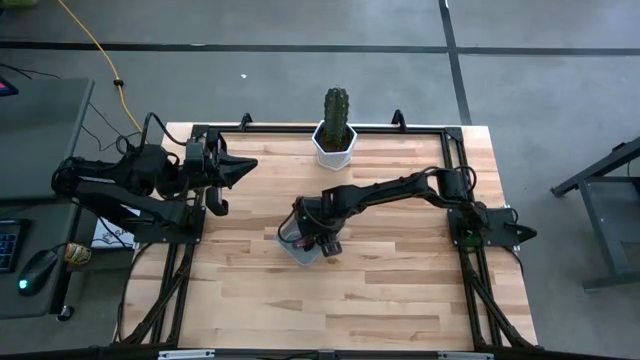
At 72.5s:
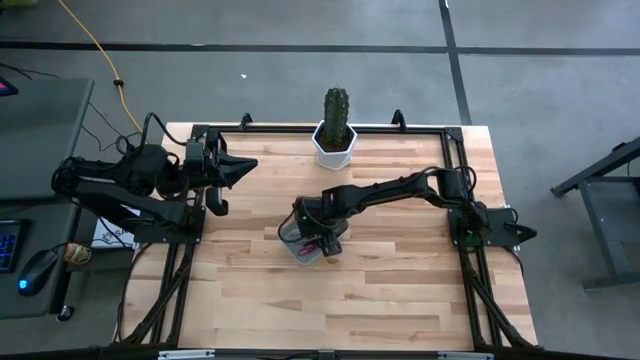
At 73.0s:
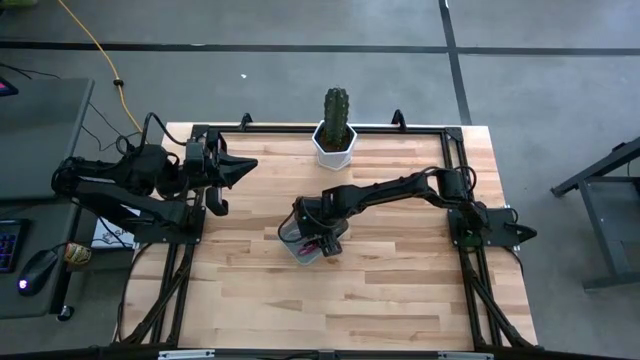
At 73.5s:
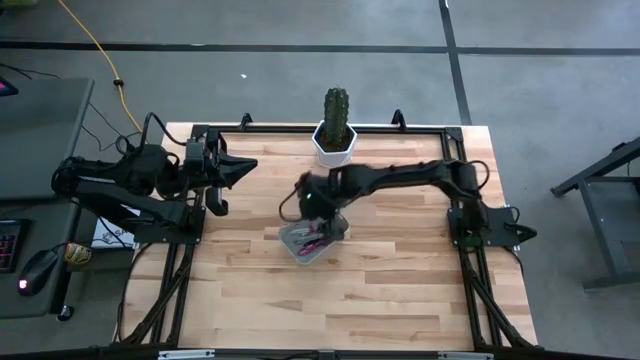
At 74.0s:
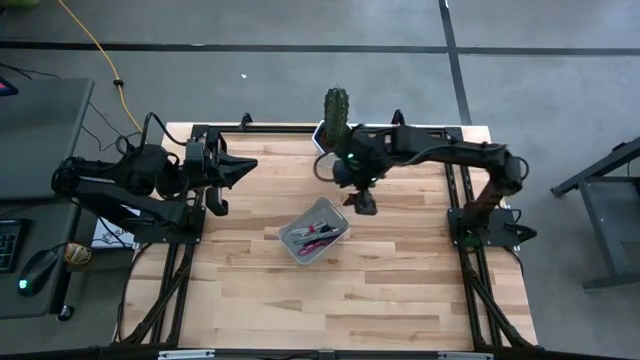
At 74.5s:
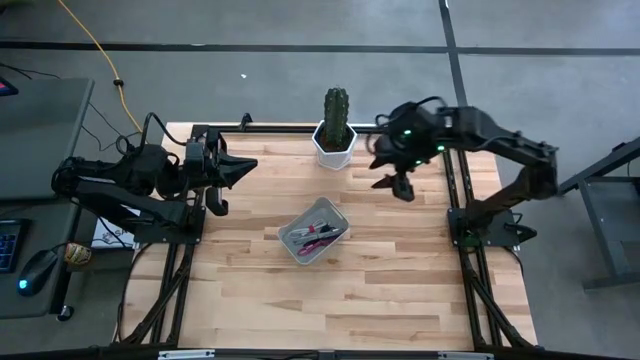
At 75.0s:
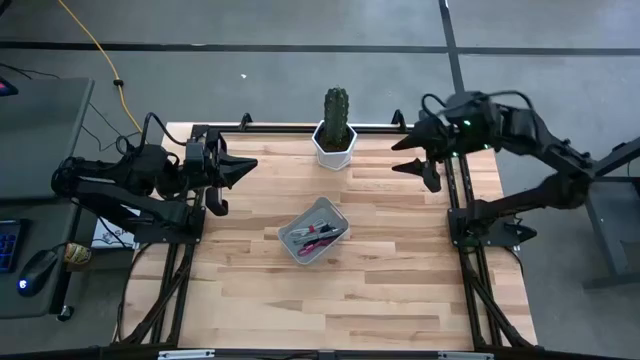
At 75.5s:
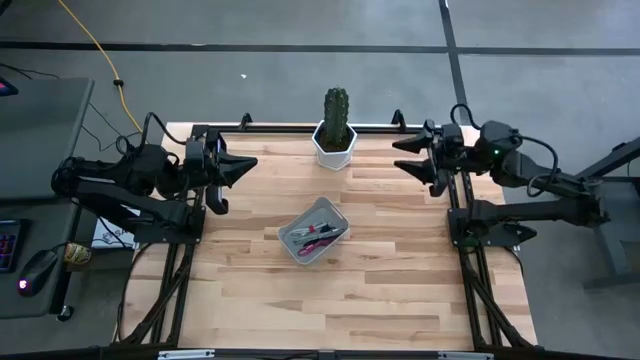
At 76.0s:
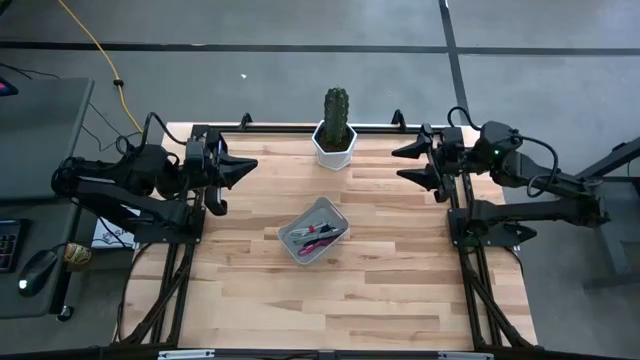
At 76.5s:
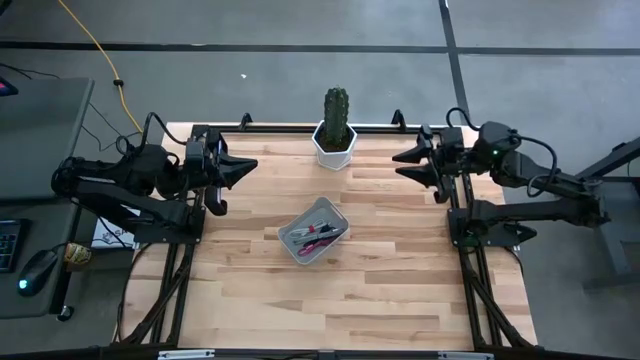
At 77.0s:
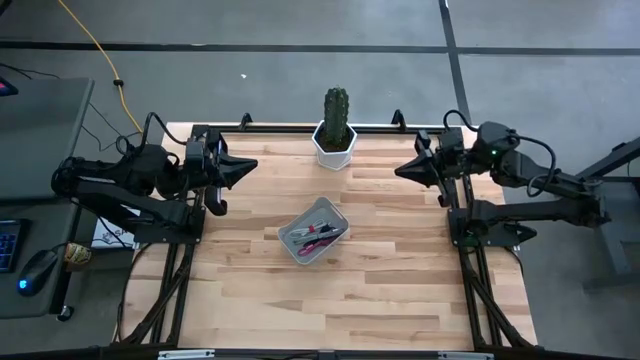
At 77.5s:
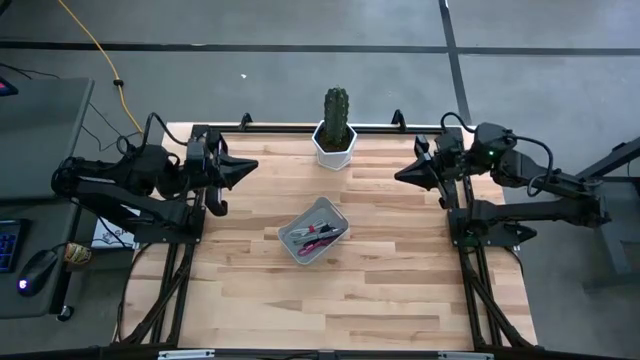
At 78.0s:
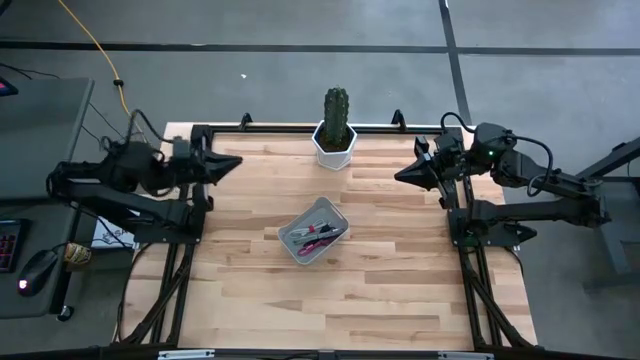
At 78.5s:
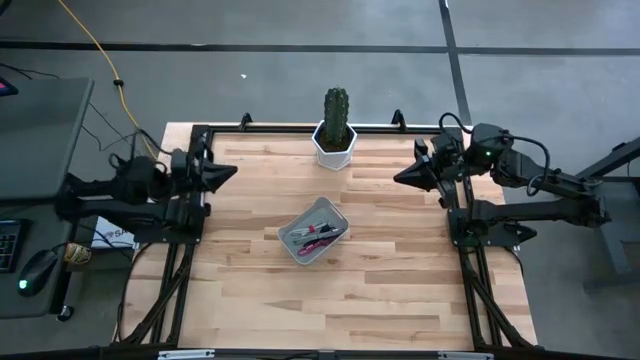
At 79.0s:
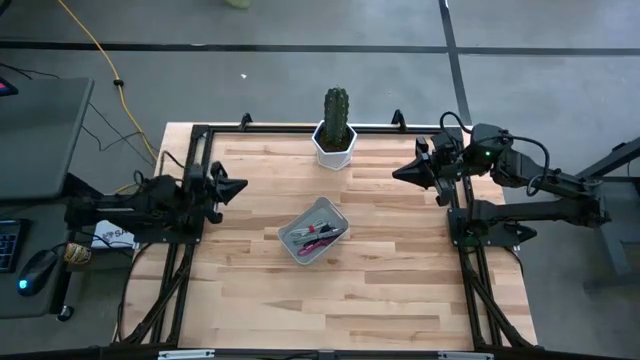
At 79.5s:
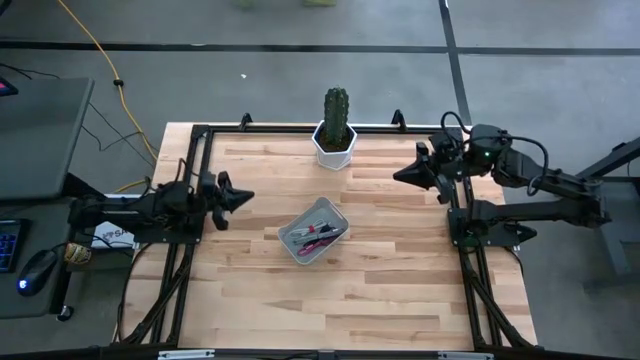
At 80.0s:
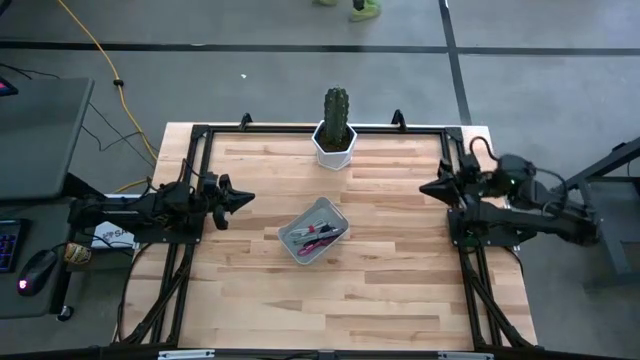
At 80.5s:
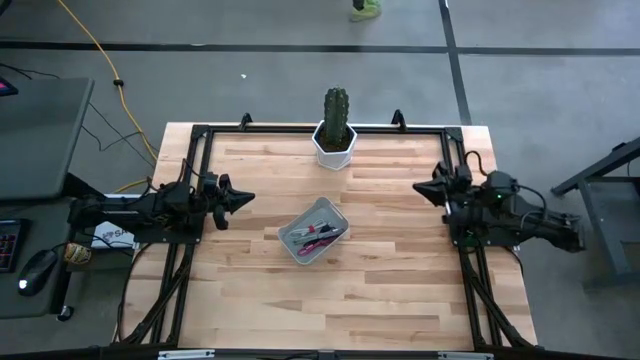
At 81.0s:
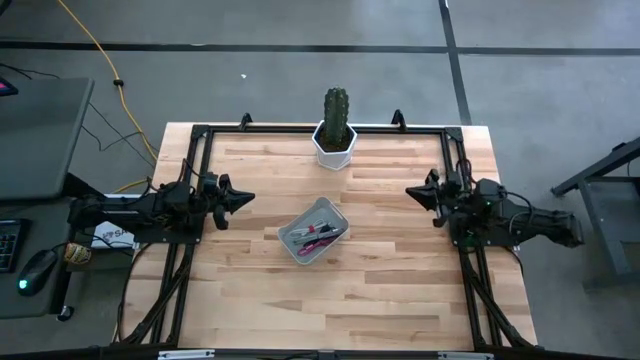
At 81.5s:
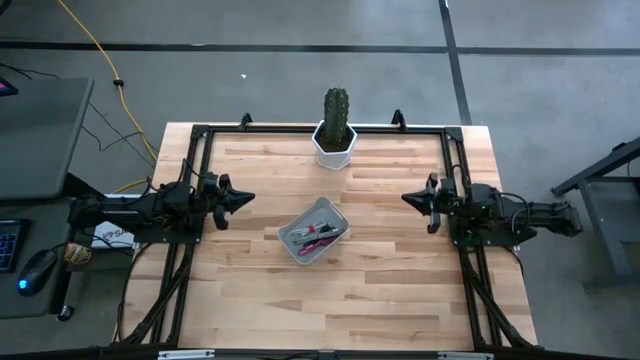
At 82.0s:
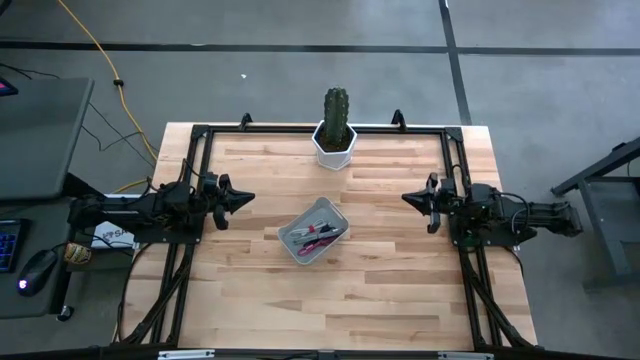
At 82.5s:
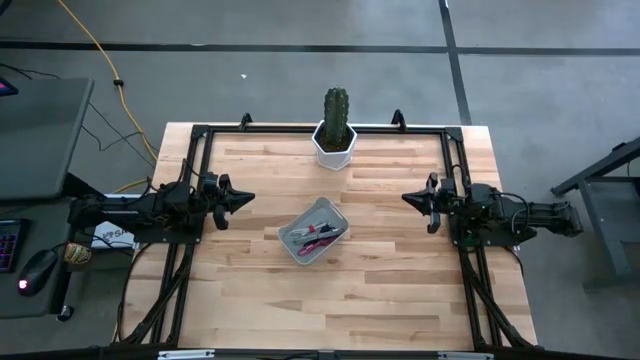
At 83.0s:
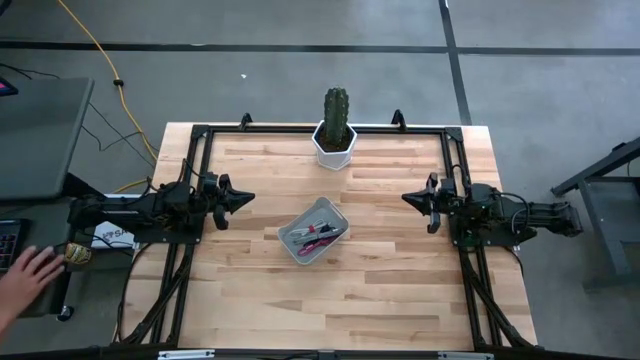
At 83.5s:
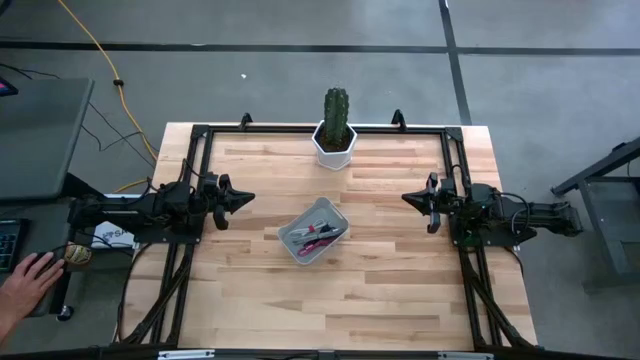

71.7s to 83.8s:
Task: Pick and place USB-C Cables
Return to Home Position

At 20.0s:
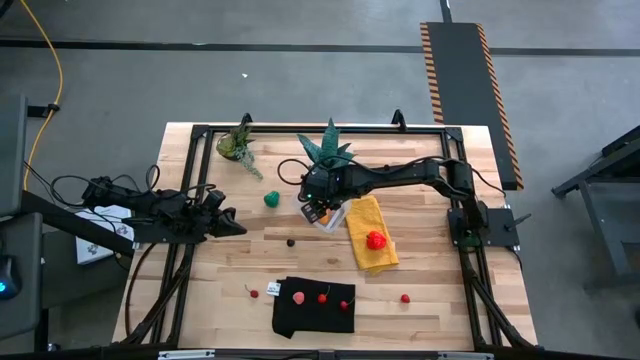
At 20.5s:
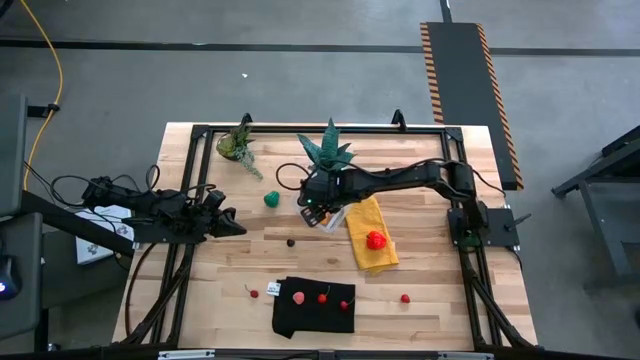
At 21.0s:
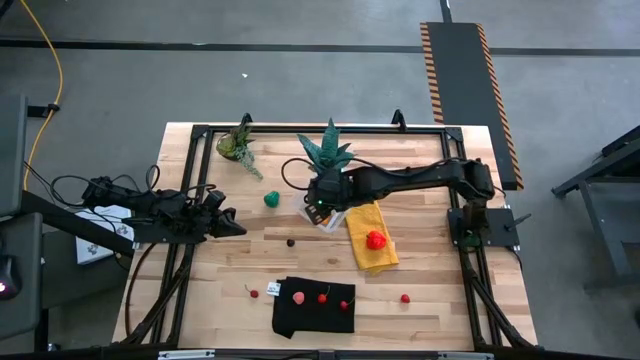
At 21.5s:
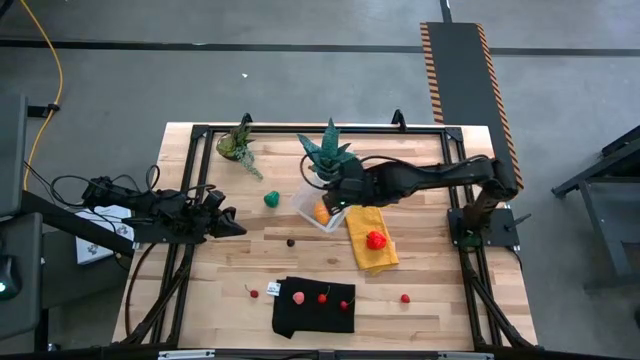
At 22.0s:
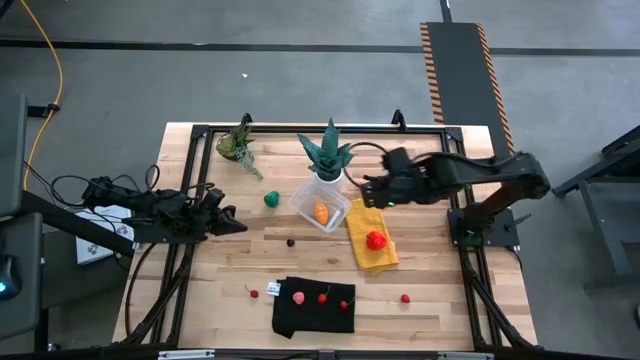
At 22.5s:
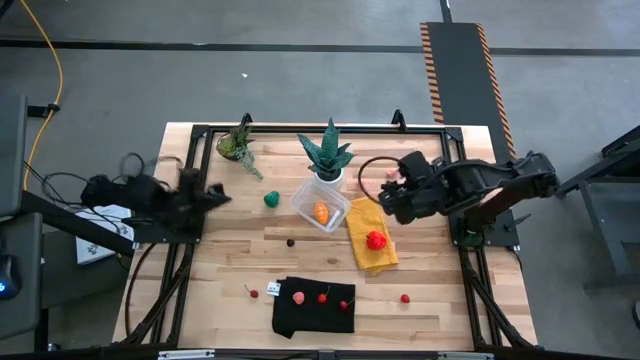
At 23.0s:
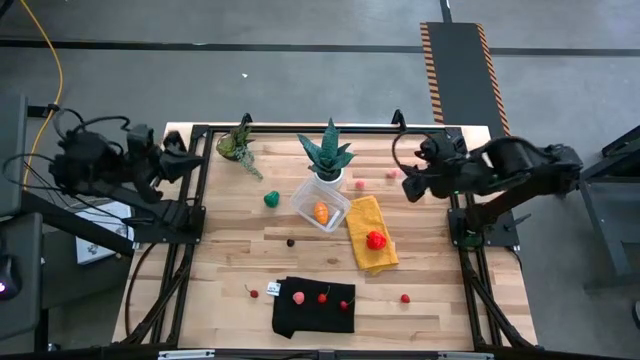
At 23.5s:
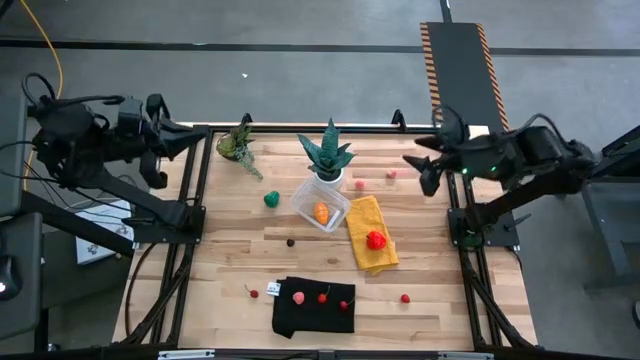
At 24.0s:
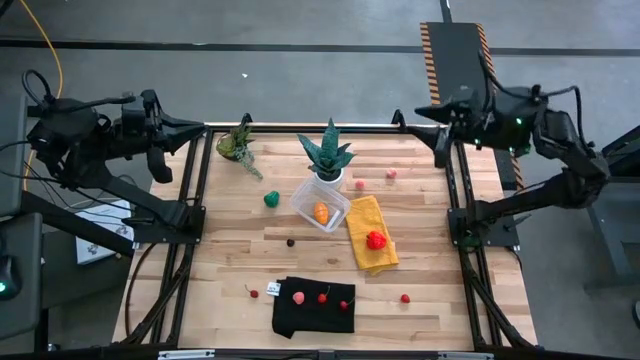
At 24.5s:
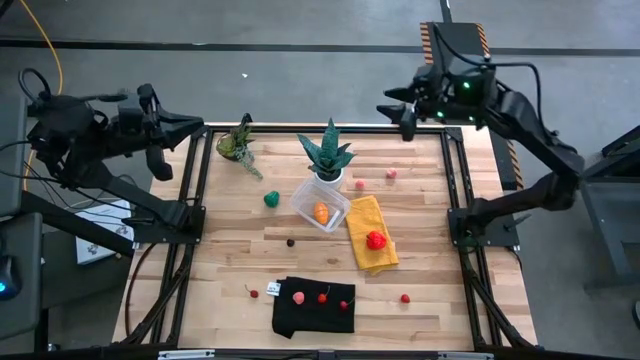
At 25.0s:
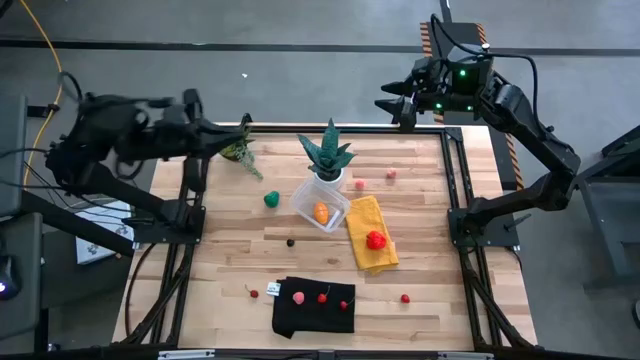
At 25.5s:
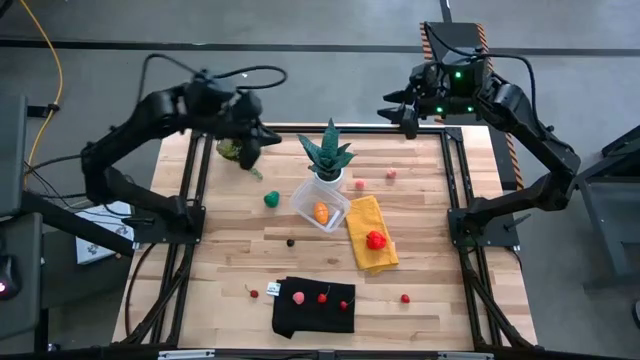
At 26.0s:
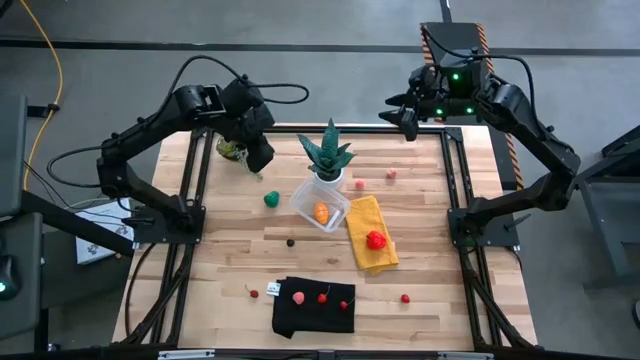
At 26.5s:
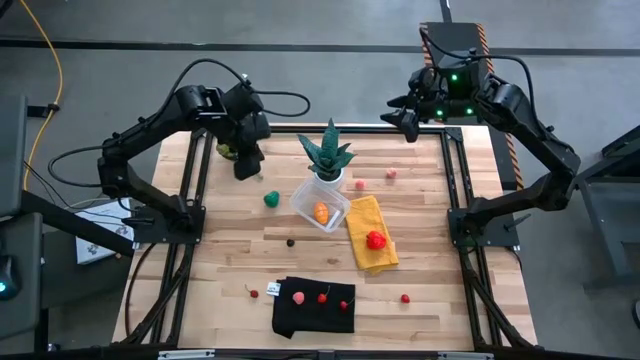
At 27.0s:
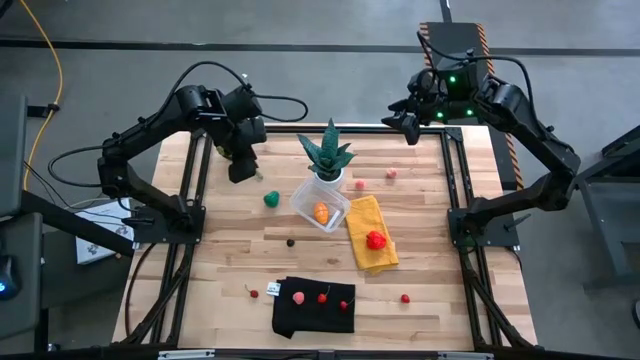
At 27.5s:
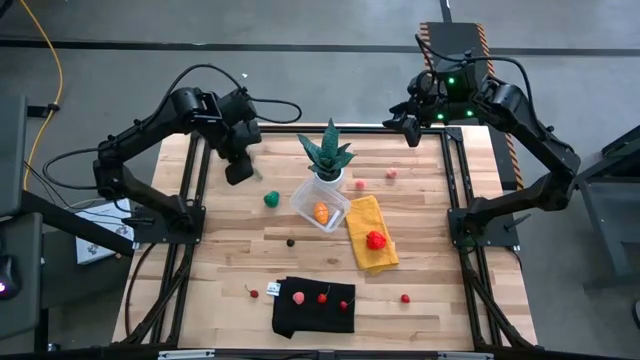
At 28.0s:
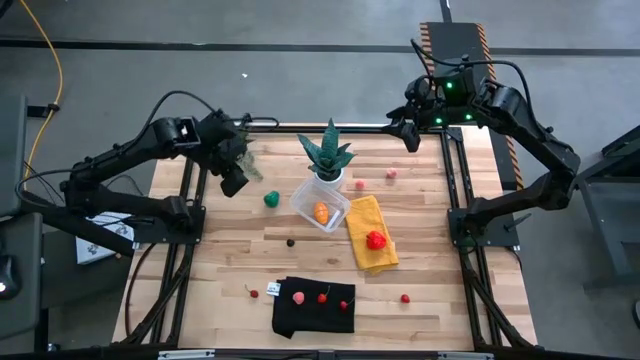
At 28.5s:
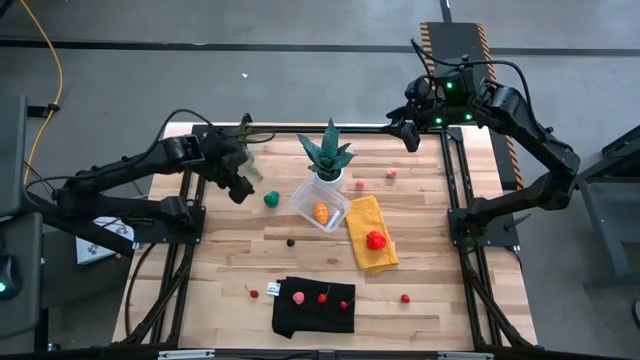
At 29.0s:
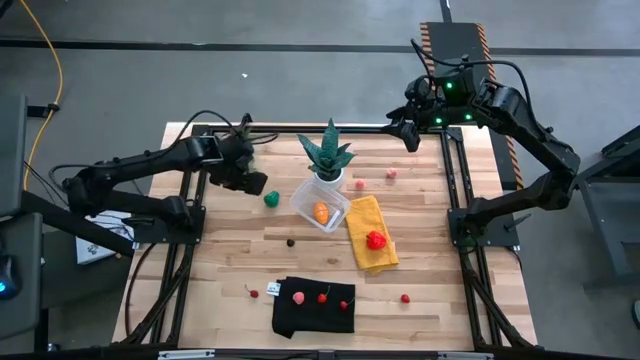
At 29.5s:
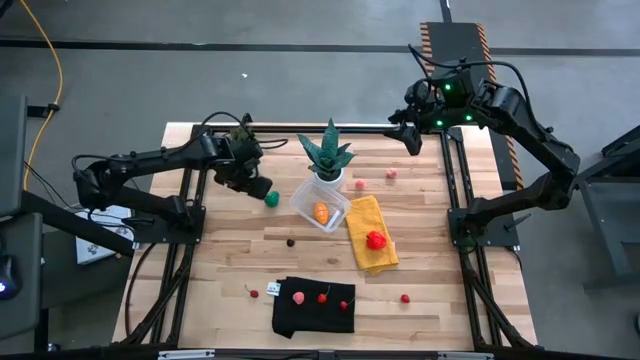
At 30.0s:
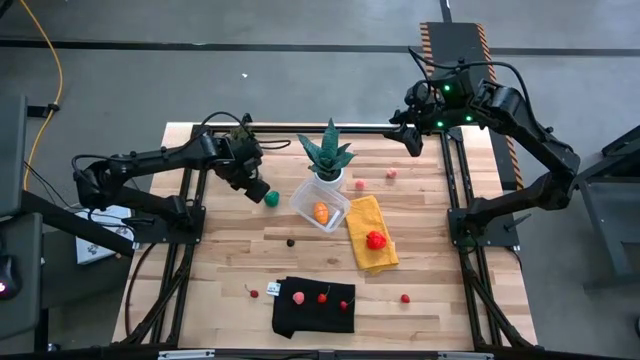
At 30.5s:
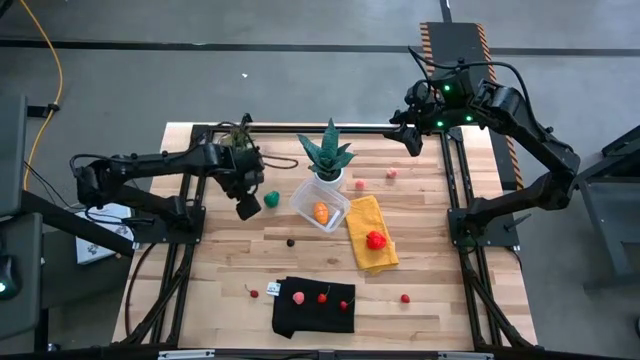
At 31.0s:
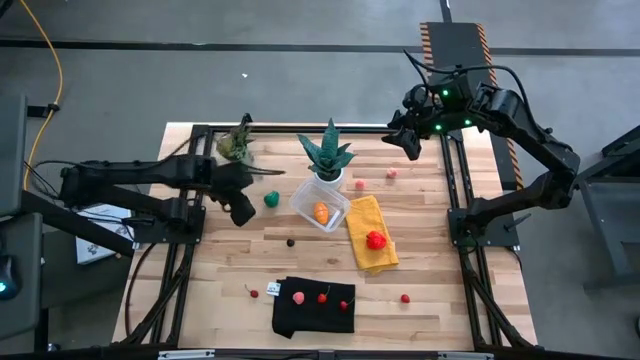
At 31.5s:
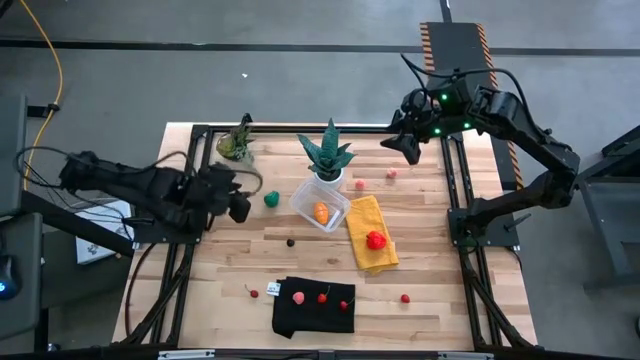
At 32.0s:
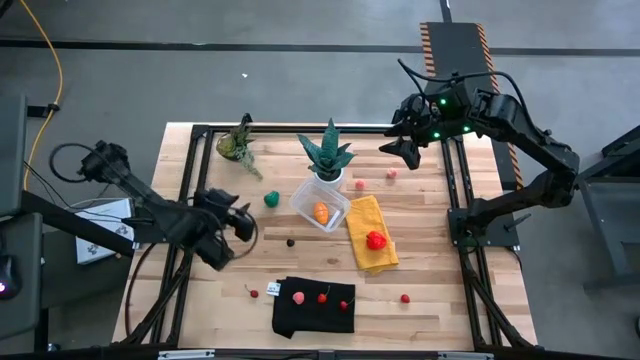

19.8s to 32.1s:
Task: Pick and placing Produce into tupperware
Put the green bell pepper into the transparent container
